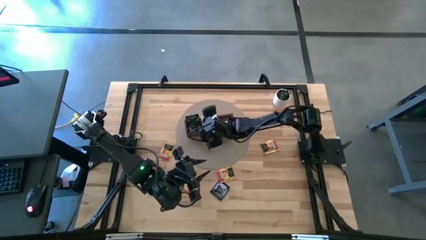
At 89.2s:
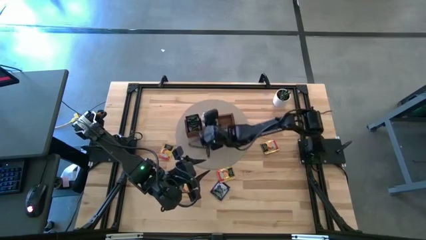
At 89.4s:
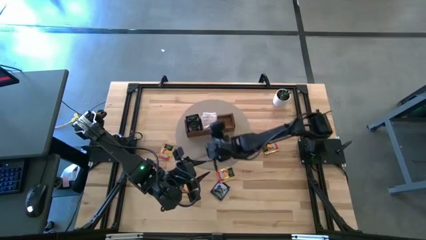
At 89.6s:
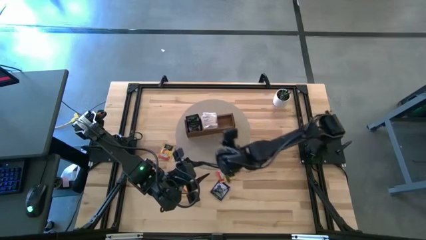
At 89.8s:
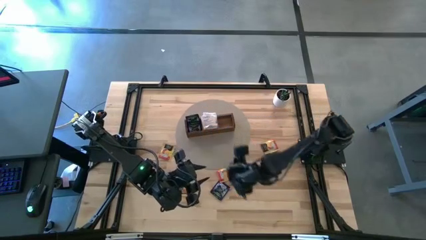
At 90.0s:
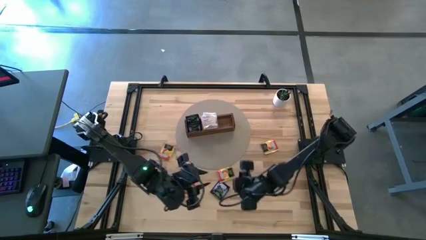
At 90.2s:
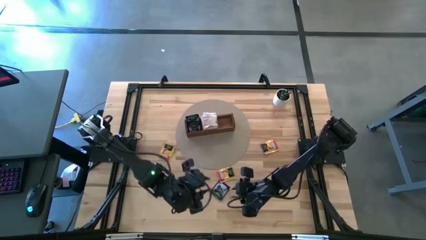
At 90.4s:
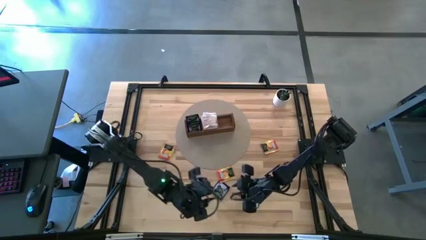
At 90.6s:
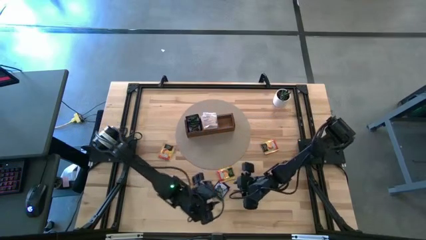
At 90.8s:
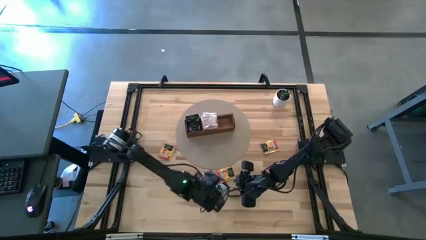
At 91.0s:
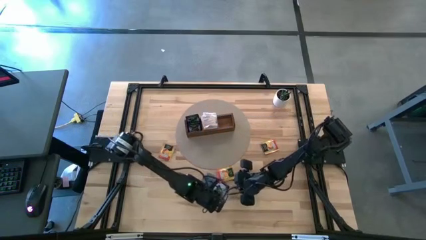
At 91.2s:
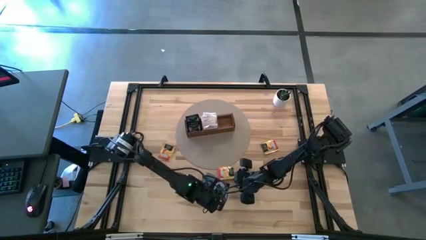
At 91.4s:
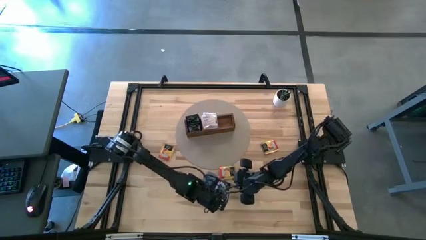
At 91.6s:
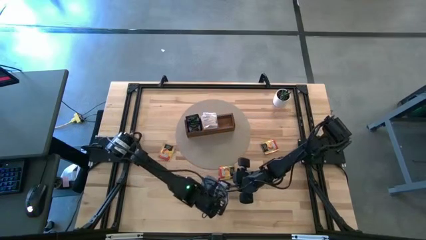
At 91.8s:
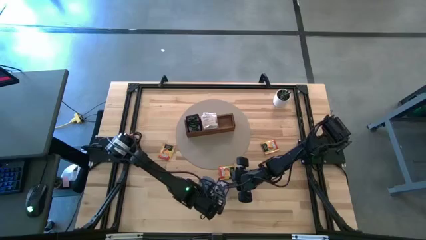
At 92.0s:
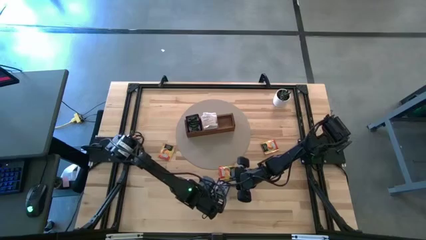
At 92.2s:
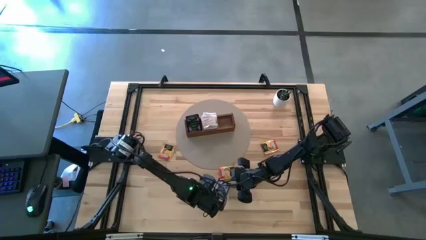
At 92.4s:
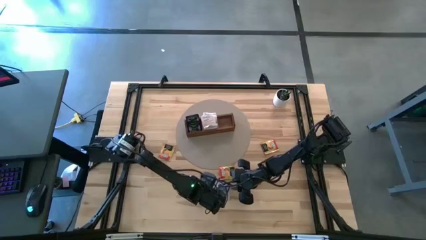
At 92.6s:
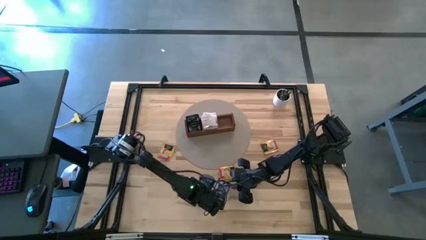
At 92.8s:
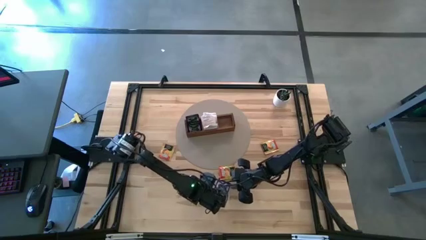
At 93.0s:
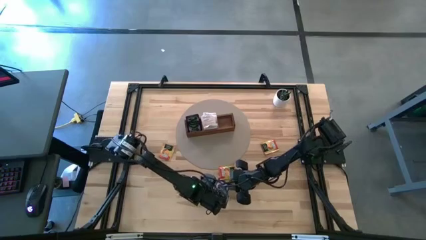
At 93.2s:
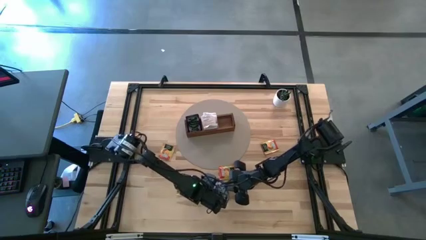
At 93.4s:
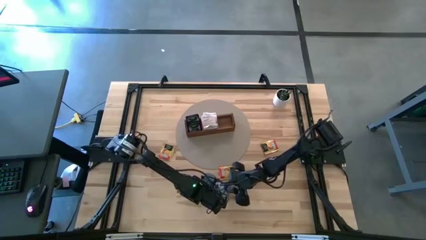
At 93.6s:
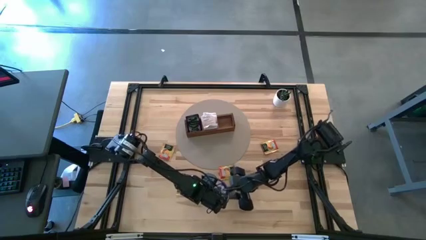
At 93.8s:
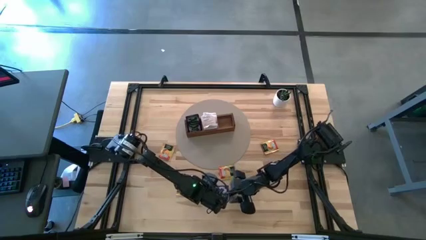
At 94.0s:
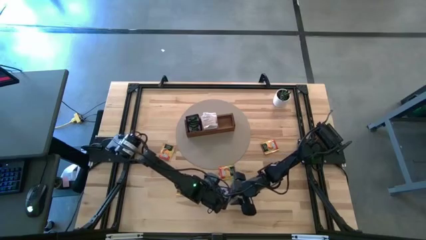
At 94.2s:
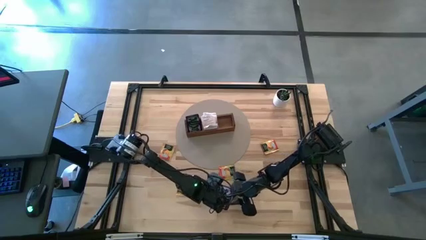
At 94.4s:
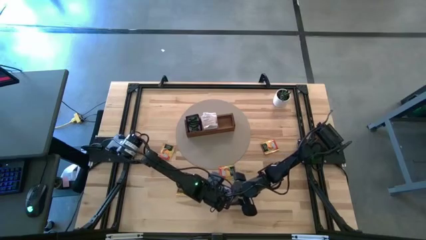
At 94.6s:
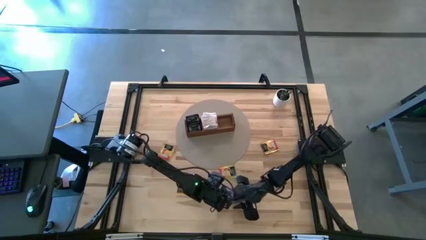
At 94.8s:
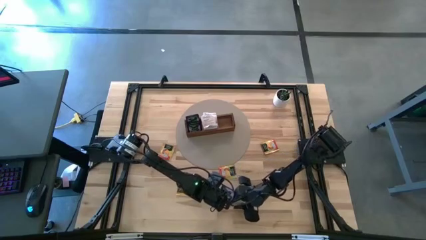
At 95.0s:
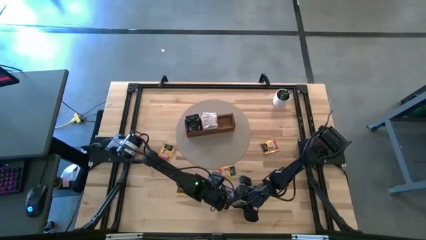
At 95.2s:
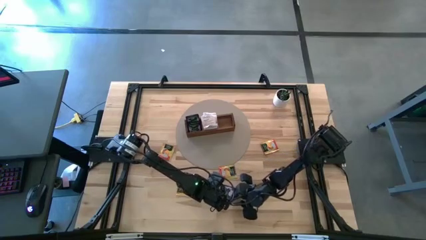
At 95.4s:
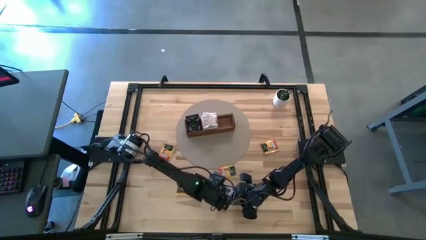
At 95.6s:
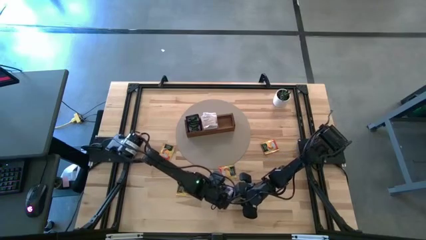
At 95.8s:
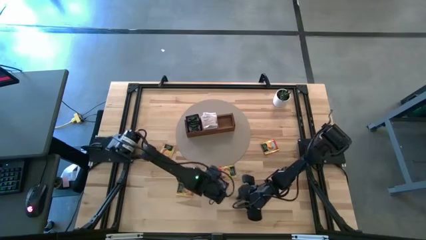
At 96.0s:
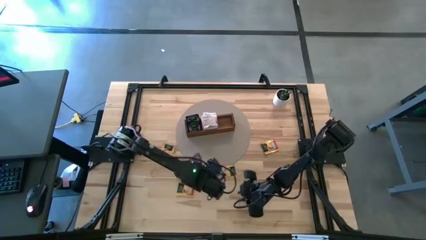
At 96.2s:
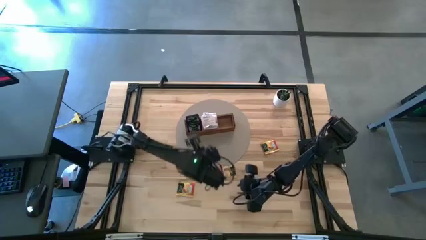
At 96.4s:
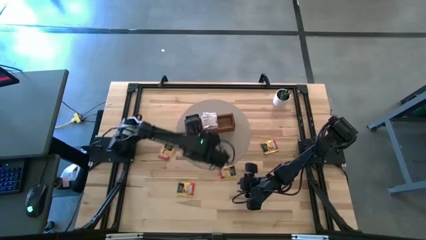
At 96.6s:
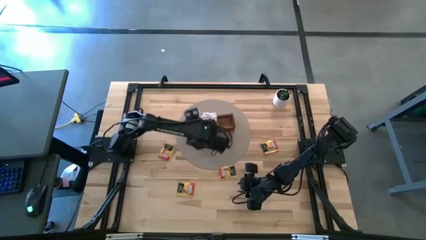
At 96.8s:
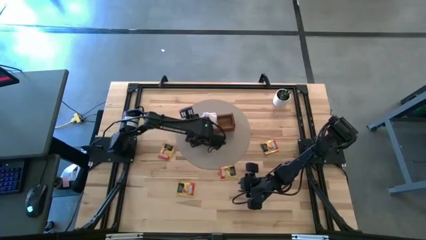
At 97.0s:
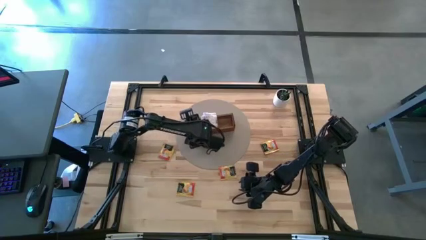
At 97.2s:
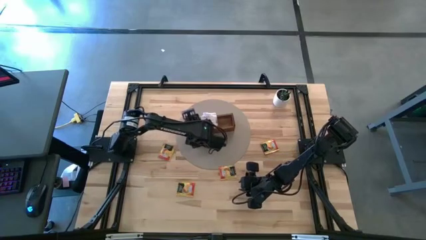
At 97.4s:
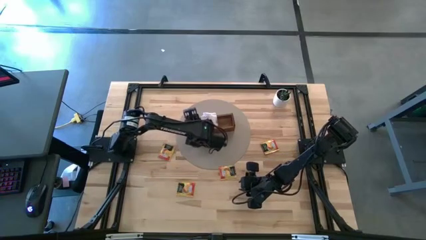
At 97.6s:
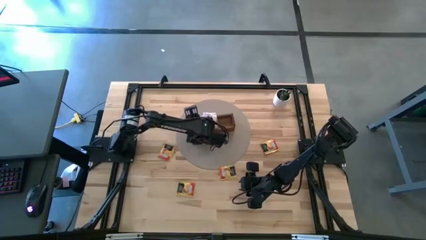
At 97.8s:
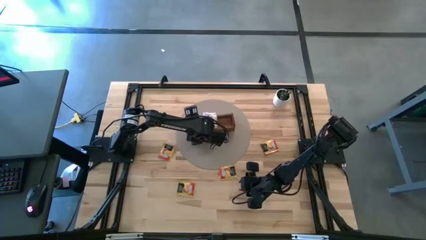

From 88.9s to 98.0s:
Task: Pick & Place Tea
Put the purple tea bag into the left section of the wooden organizer

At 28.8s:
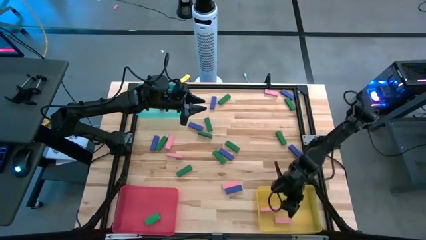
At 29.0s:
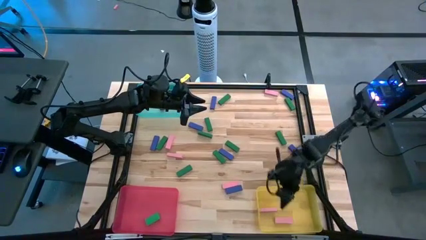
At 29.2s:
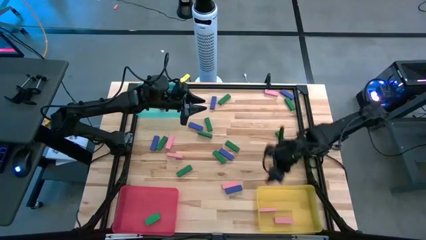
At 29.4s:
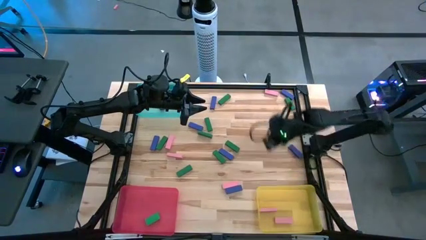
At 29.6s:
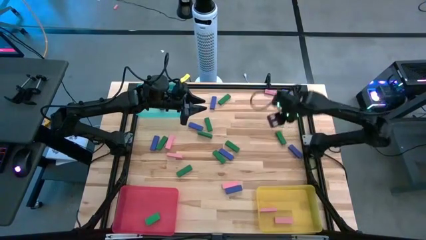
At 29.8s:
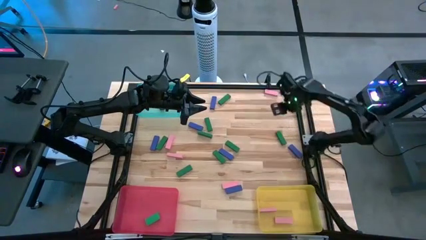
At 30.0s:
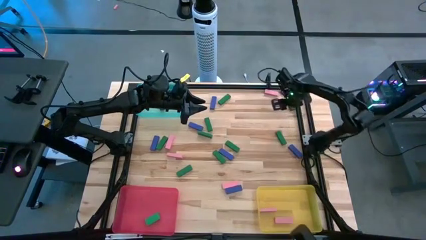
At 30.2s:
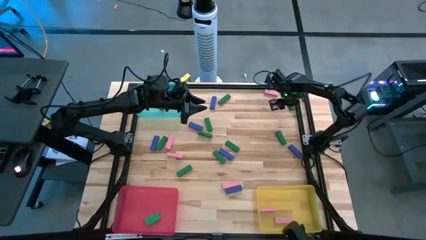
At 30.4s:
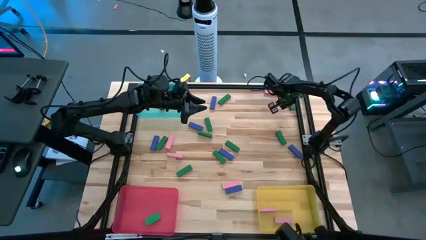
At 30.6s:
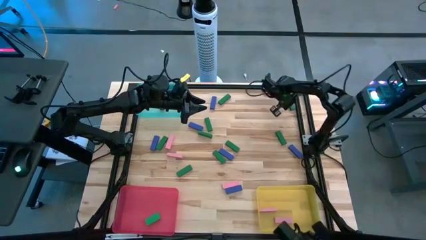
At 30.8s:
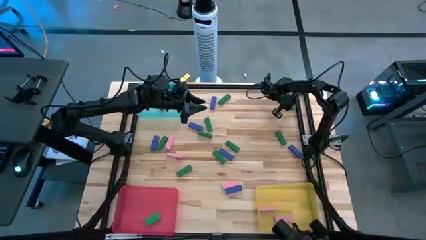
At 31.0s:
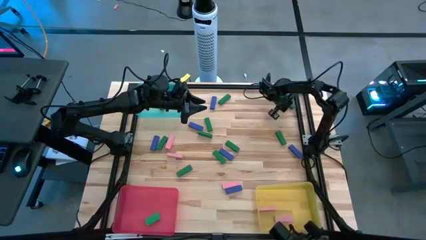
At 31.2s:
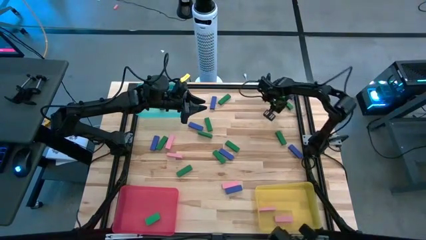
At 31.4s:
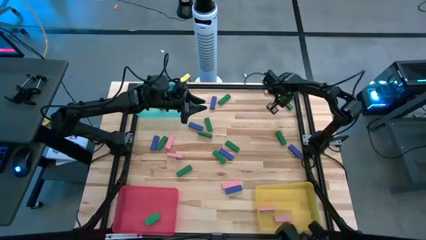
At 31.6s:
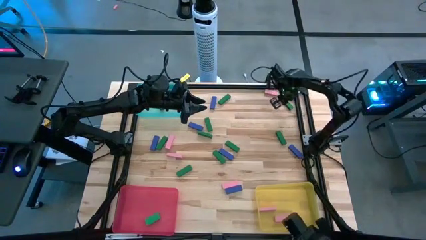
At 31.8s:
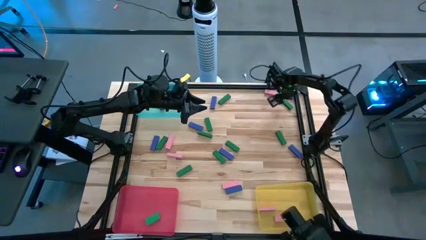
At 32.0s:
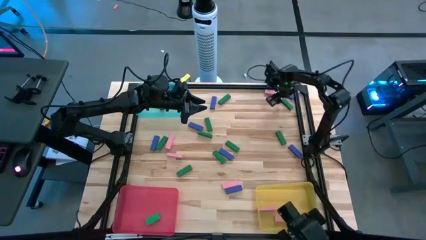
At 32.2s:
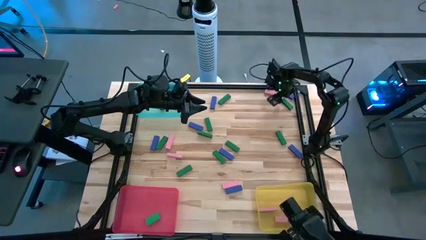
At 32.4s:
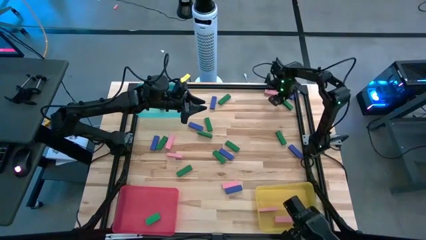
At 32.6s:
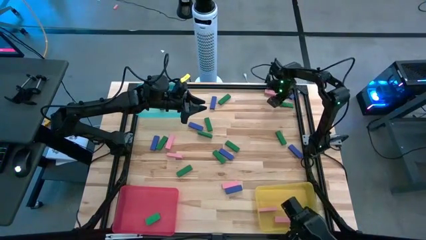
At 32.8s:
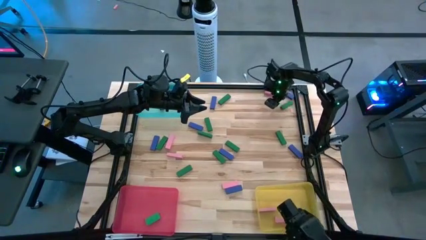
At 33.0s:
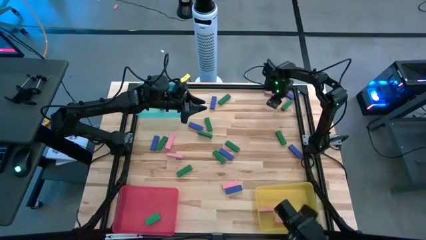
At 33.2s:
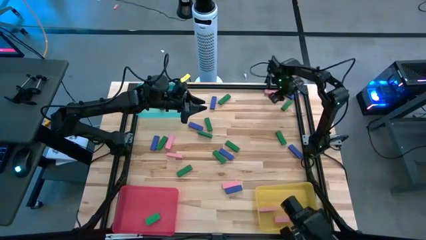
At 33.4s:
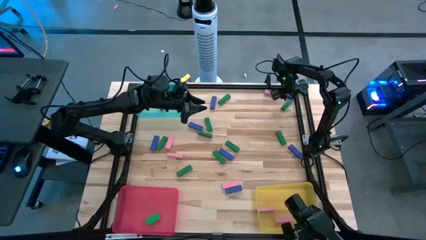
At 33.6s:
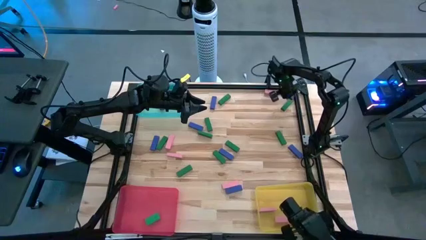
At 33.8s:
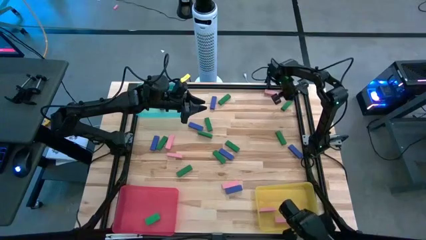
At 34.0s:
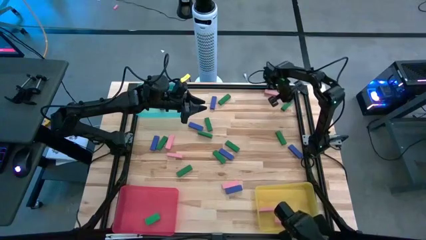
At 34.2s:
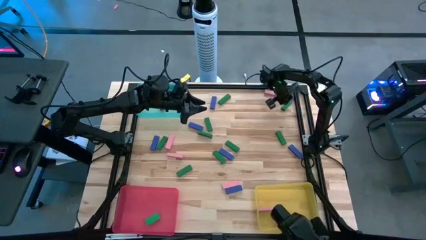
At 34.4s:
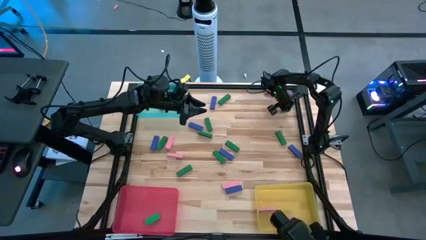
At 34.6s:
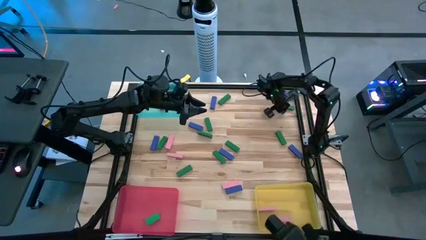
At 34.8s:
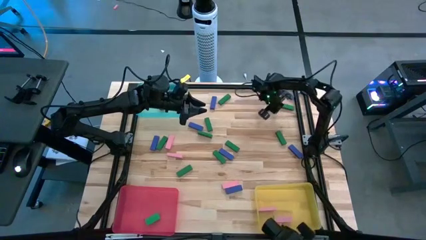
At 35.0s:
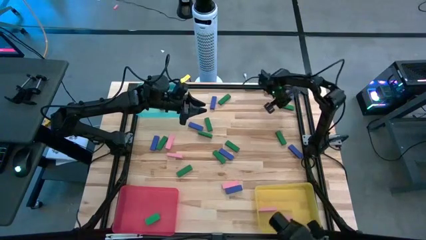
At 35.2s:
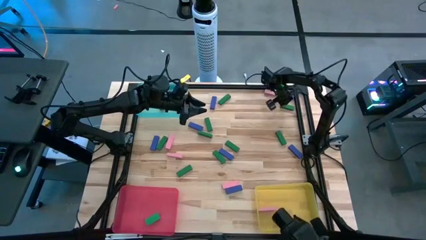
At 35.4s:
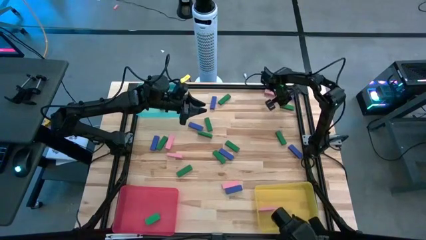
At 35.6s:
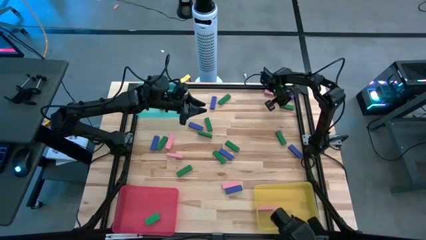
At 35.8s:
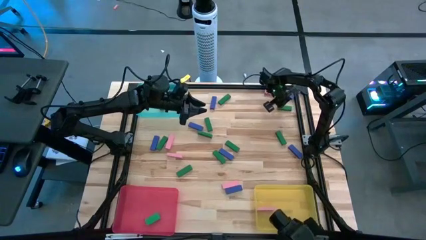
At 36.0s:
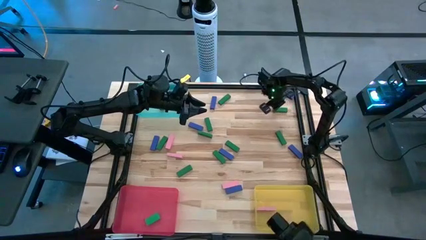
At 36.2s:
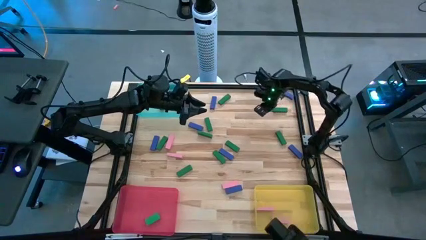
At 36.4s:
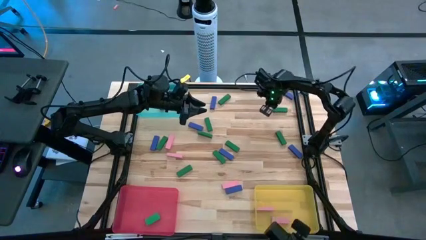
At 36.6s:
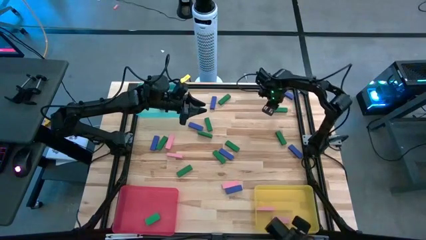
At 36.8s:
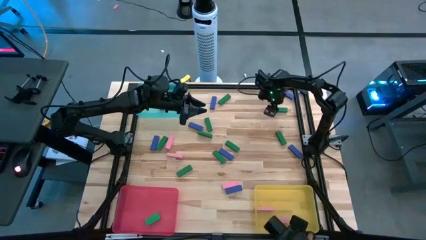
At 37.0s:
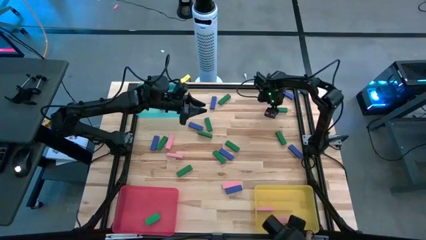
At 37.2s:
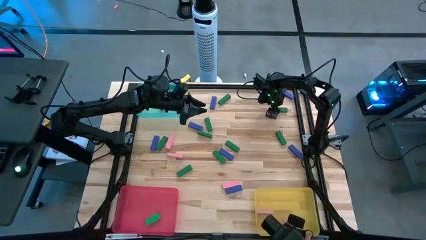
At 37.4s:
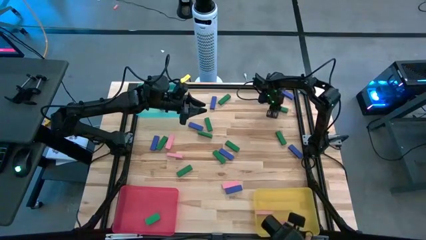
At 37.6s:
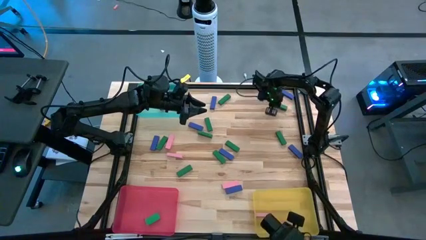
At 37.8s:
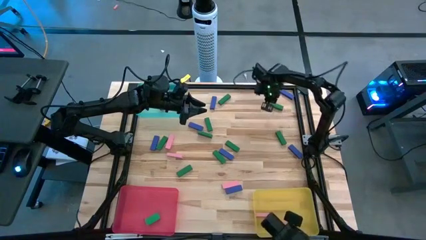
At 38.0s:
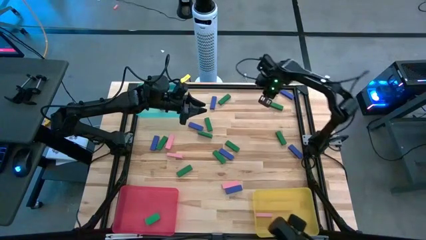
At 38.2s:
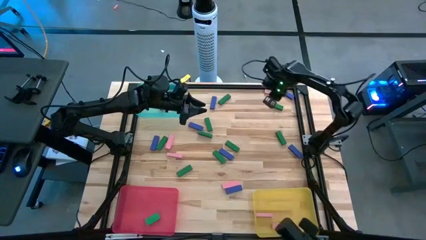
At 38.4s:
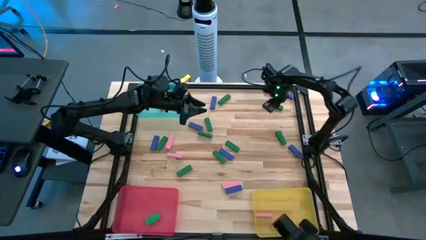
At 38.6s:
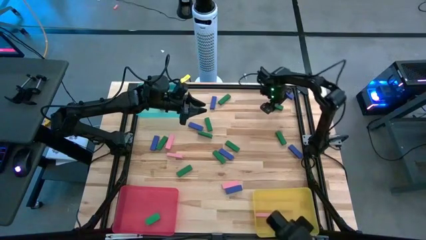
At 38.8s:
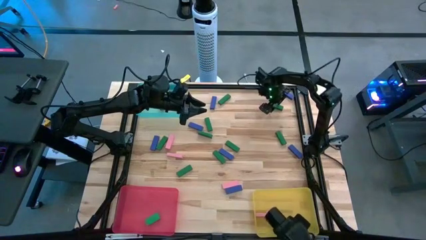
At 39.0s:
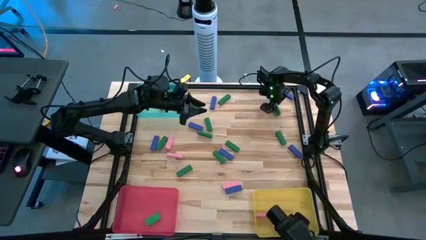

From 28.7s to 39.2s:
Task: Sort blocks
Put the green block into the red bin
